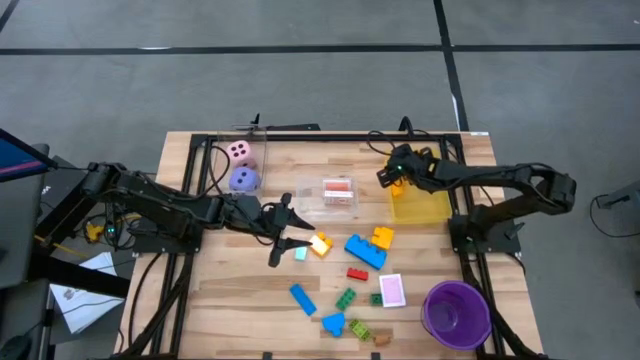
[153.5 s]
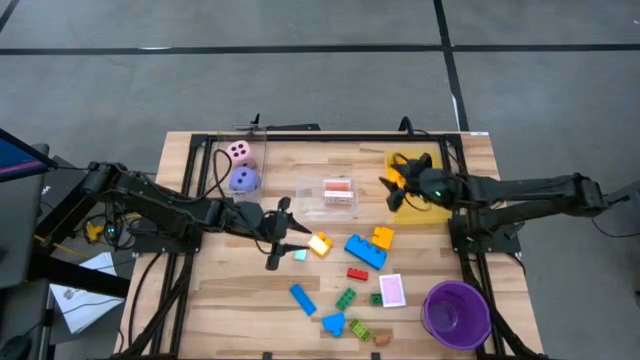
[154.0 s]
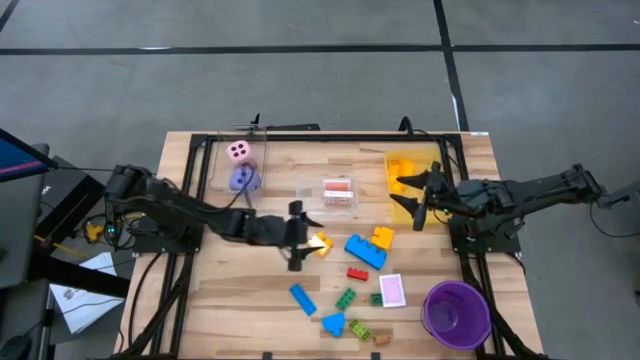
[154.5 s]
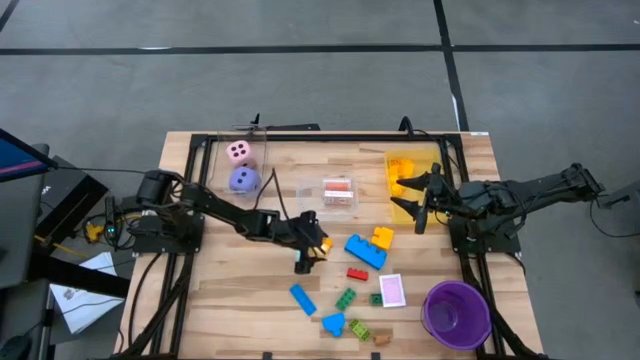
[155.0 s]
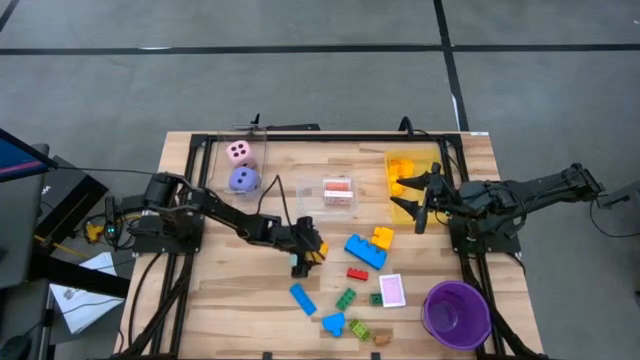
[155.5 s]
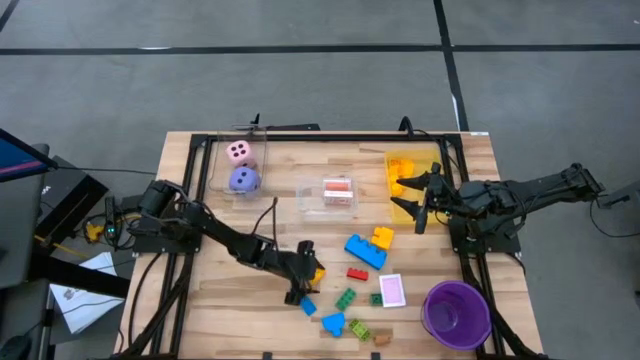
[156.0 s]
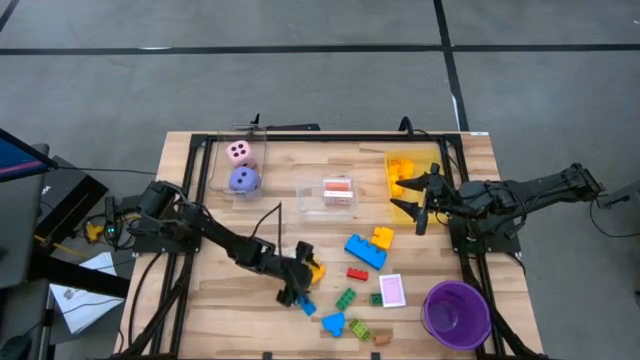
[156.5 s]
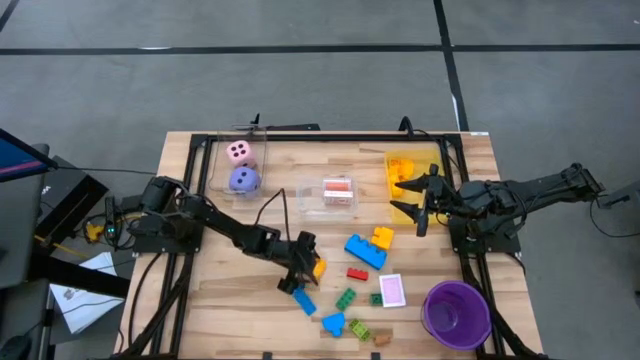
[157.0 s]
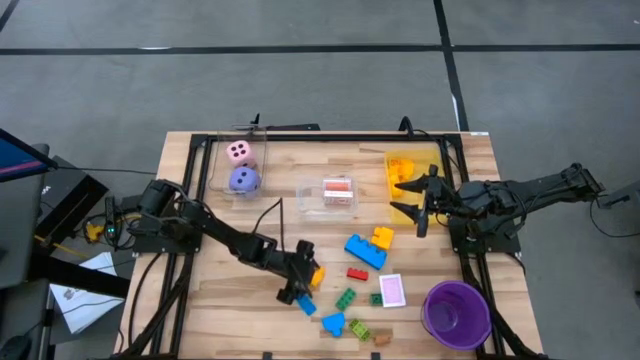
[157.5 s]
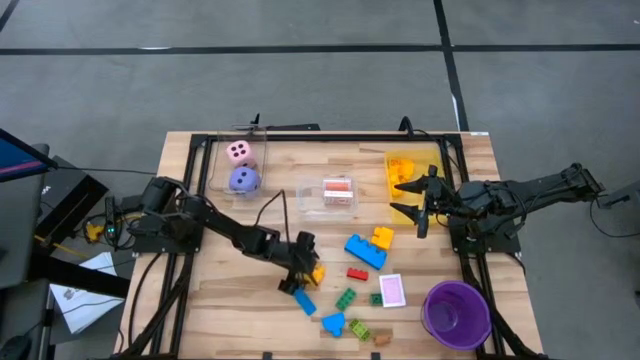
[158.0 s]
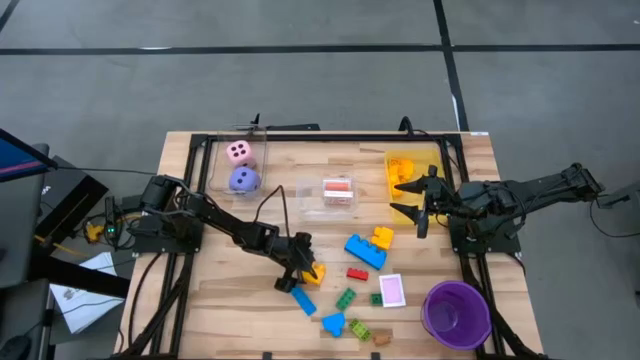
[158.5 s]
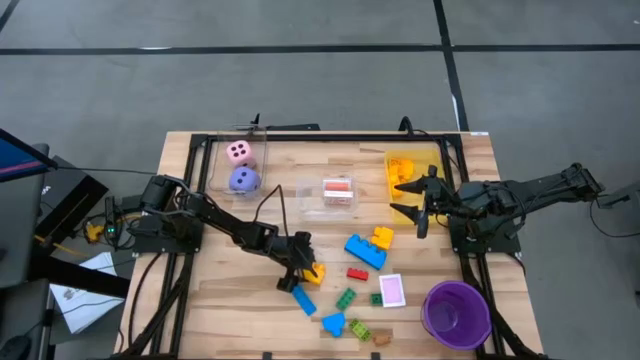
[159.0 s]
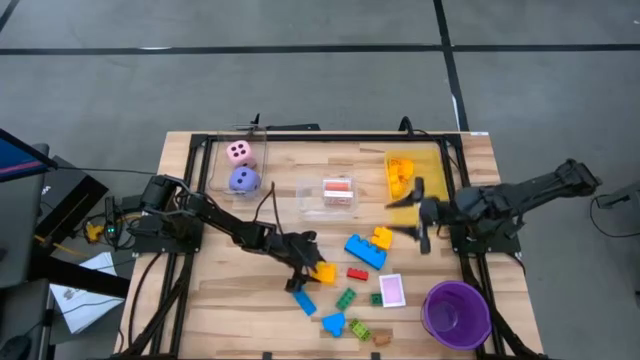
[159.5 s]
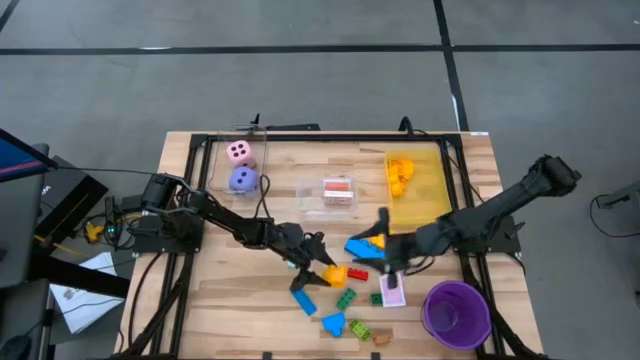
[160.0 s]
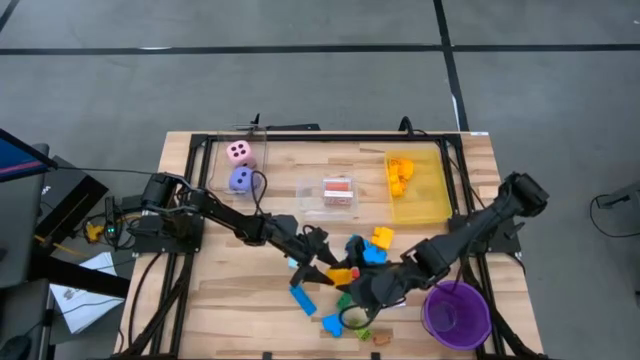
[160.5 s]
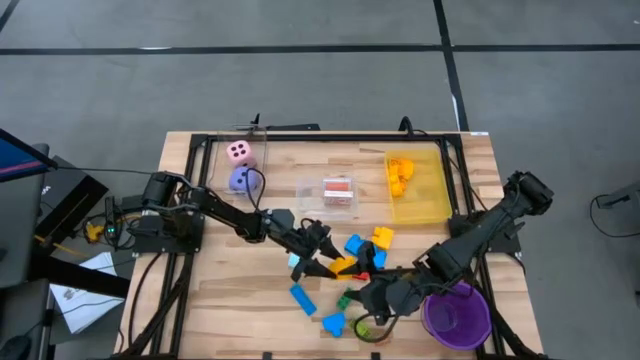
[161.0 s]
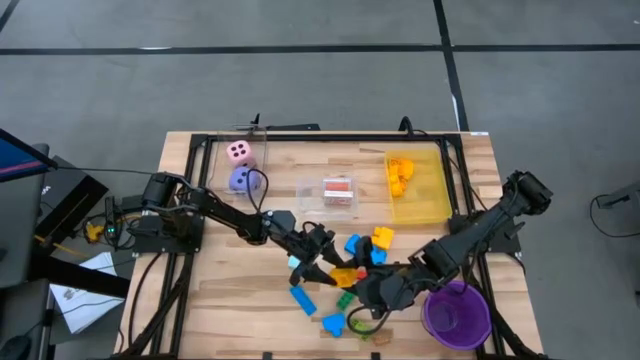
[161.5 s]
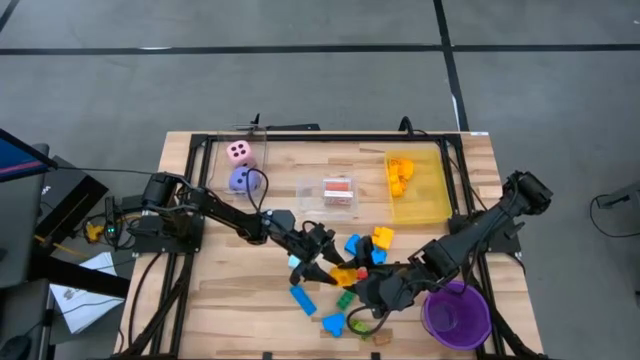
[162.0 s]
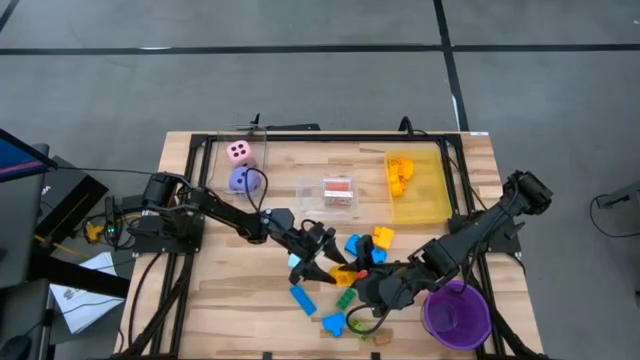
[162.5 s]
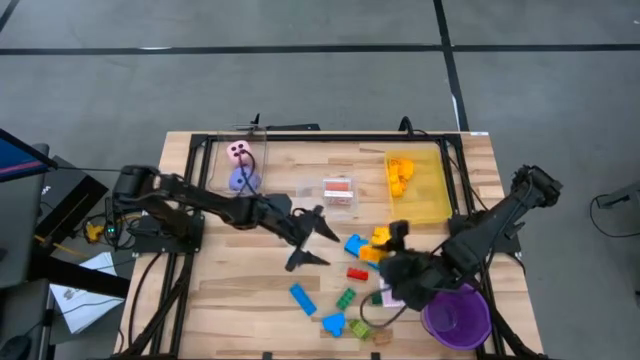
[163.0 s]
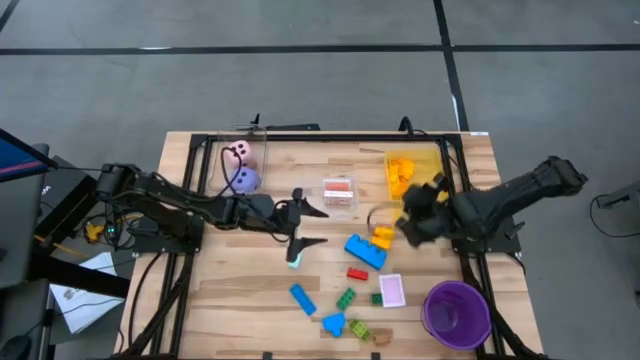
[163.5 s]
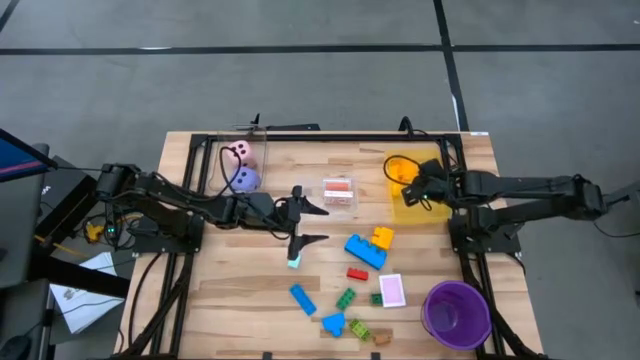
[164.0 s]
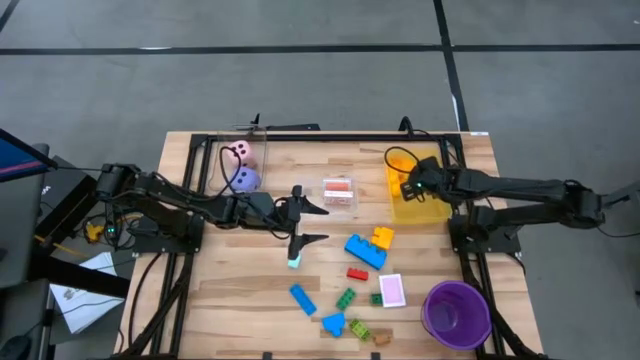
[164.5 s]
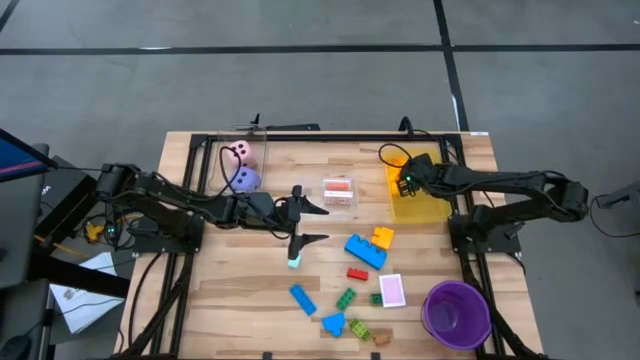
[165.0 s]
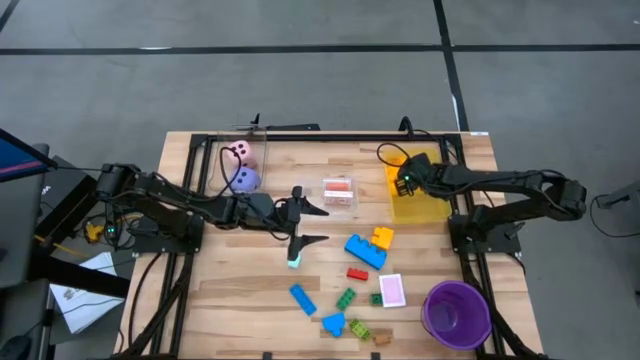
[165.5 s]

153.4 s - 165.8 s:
Task: Pick & Place Toys
Put the yellow game piece into the yellow bin

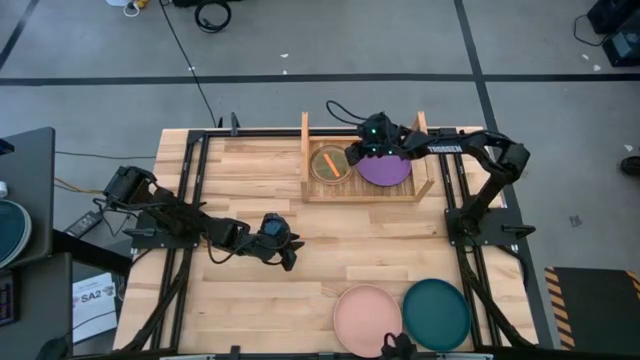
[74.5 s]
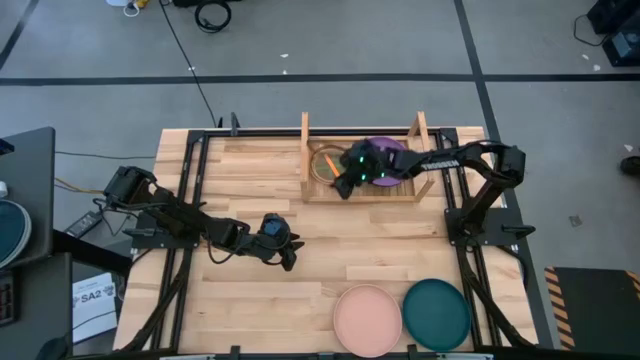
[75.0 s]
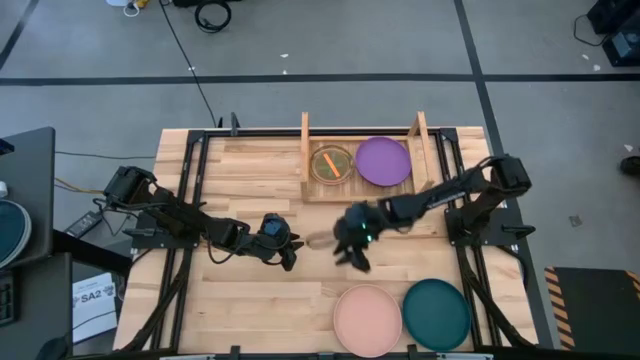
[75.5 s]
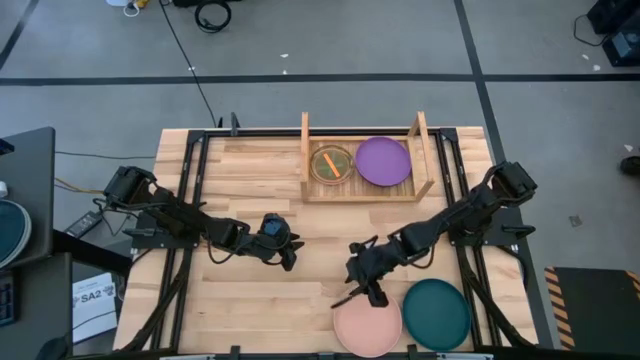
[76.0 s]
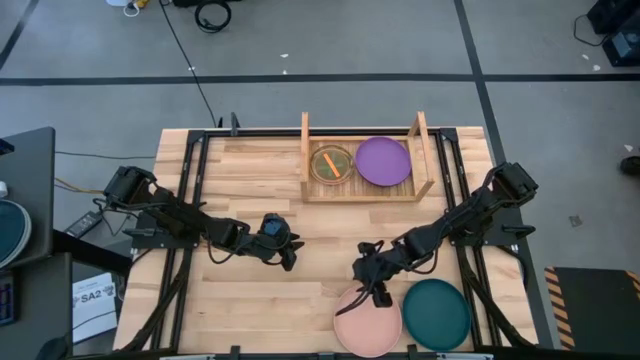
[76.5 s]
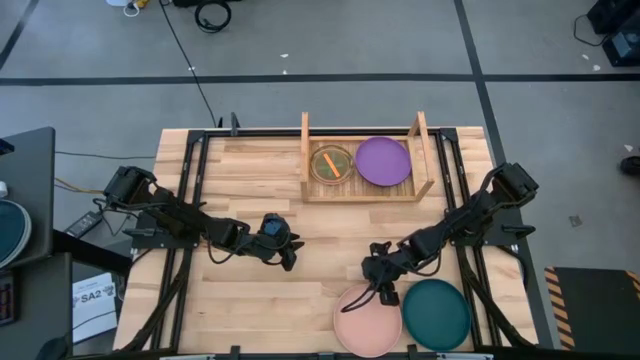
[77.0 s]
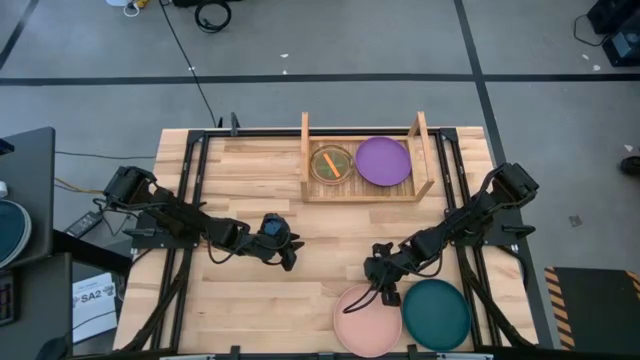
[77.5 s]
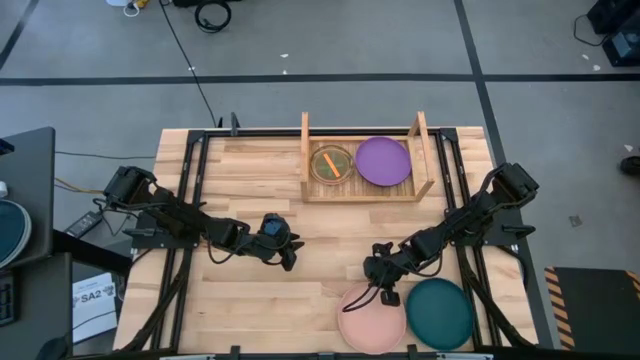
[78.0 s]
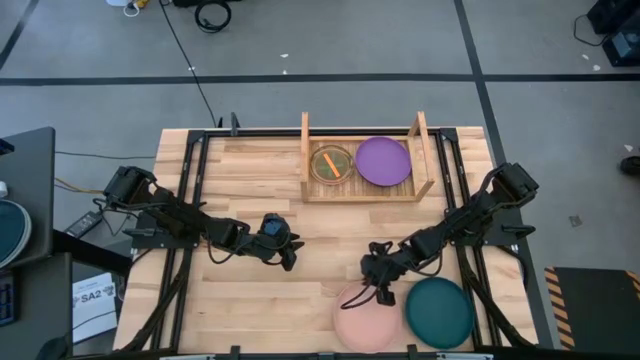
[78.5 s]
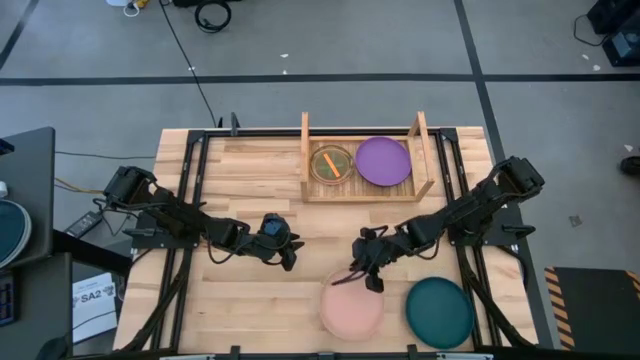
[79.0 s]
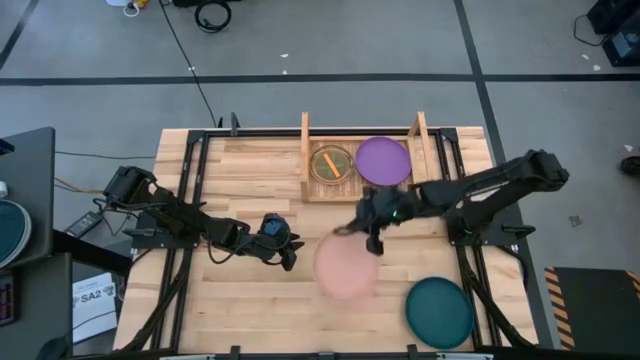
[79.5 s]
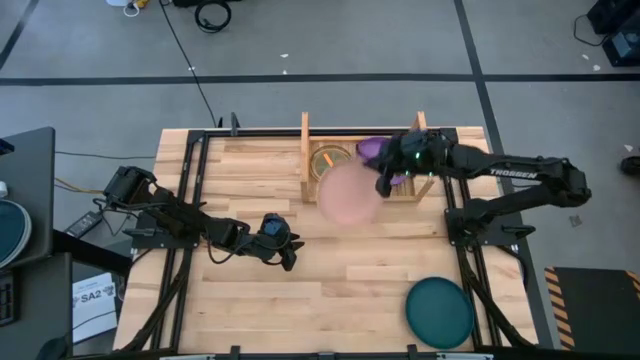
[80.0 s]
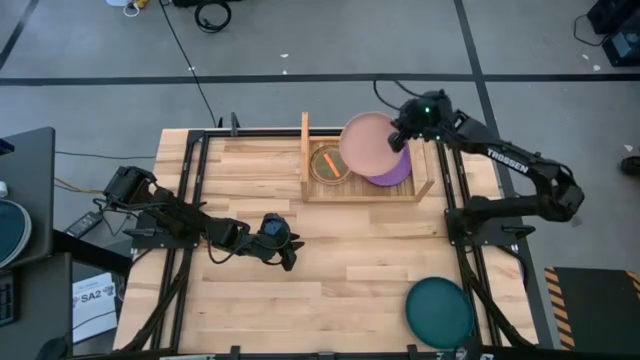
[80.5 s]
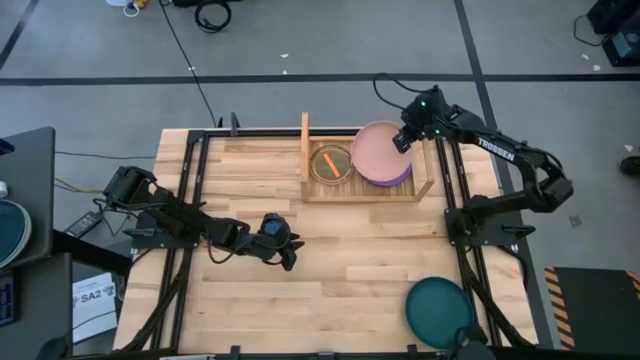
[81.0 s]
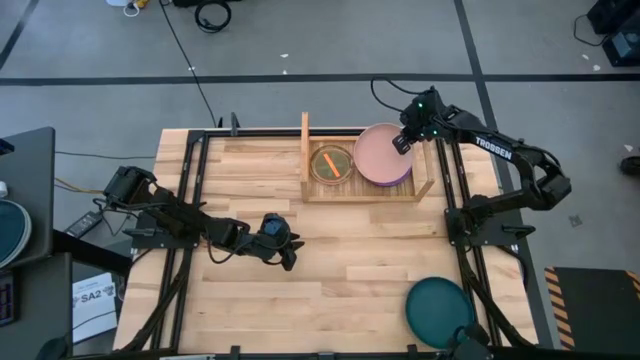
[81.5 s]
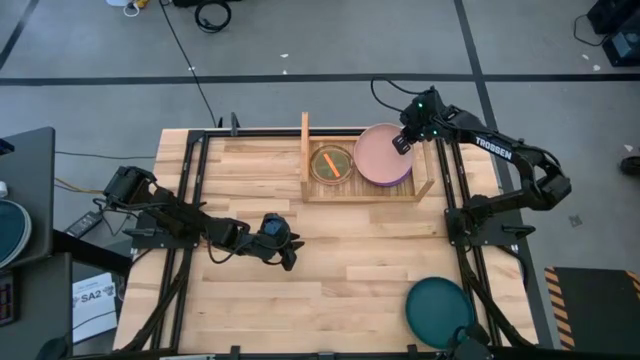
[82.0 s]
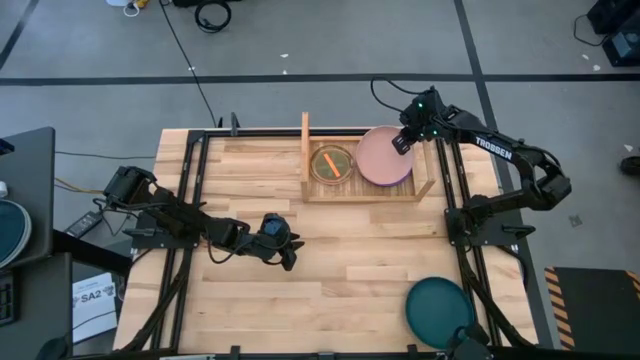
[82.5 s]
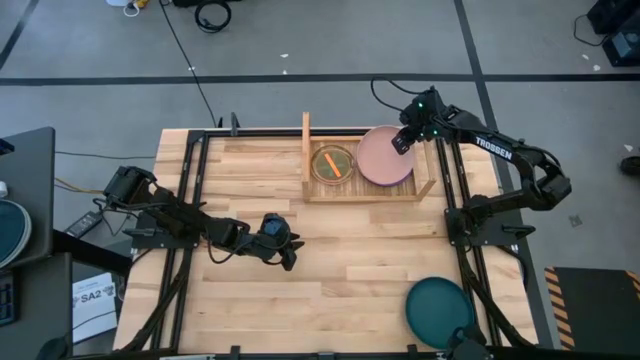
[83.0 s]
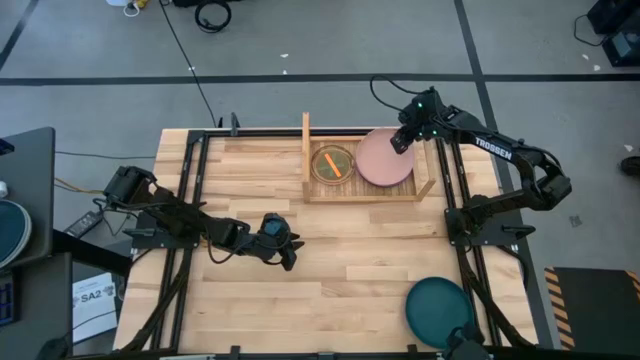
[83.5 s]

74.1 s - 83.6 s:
Task: Place and stack plates onto a shelf
Stack the large light orange plate on top of the large purple plate on the shelf
